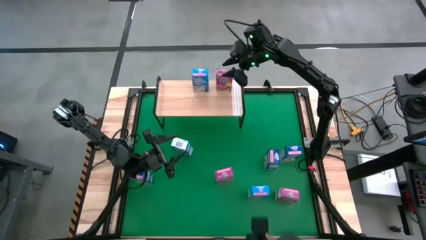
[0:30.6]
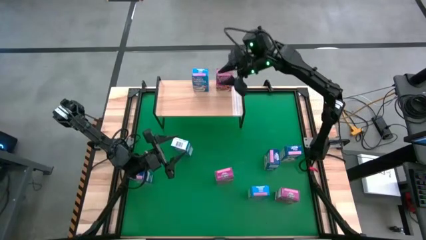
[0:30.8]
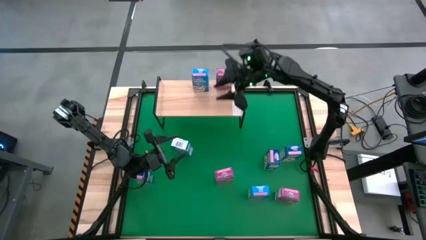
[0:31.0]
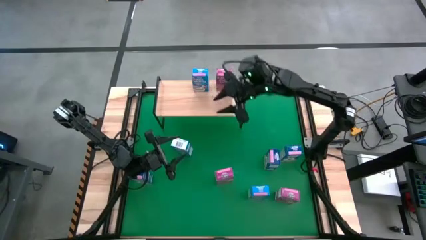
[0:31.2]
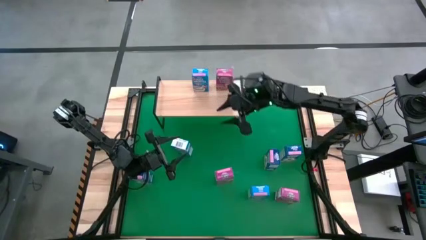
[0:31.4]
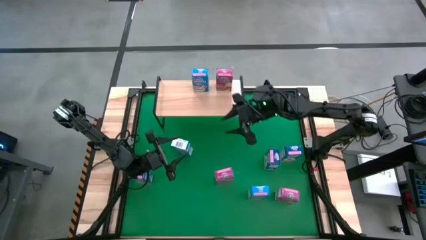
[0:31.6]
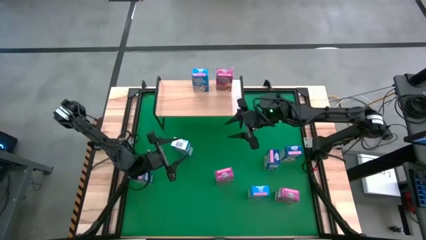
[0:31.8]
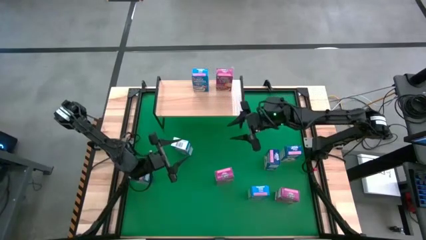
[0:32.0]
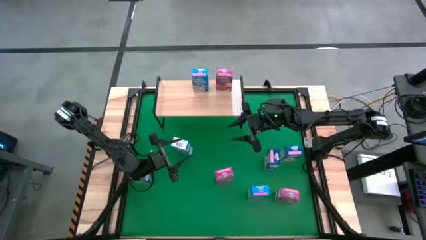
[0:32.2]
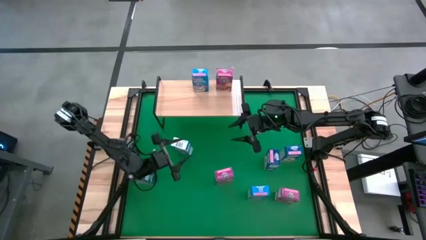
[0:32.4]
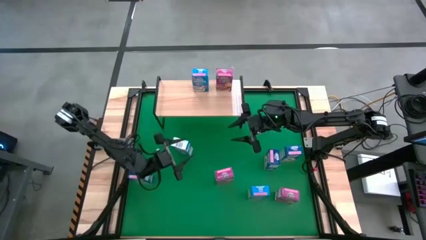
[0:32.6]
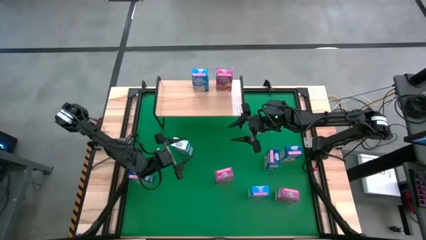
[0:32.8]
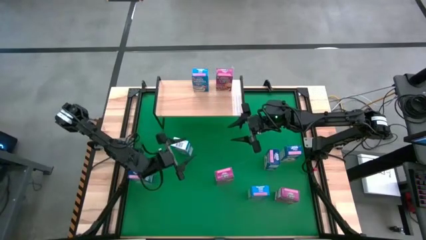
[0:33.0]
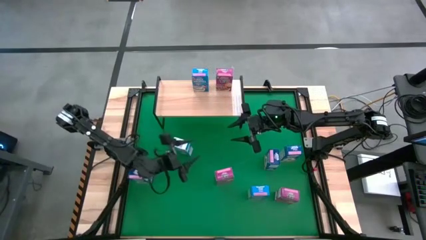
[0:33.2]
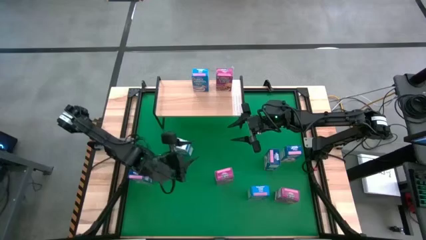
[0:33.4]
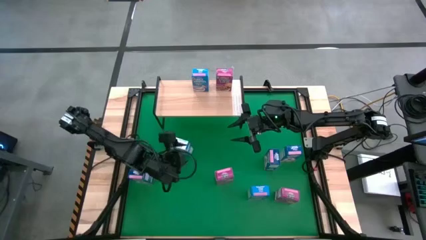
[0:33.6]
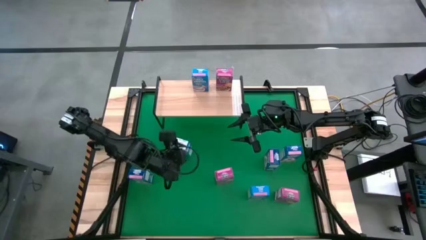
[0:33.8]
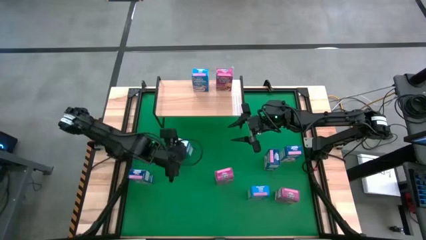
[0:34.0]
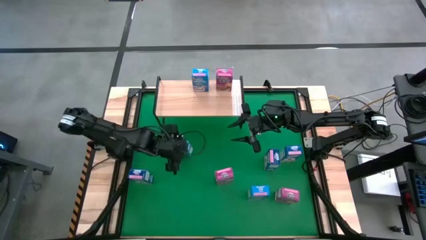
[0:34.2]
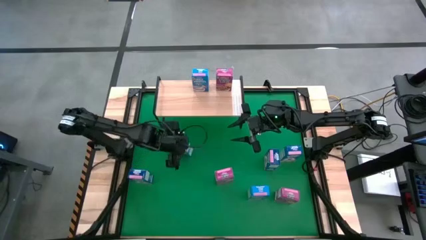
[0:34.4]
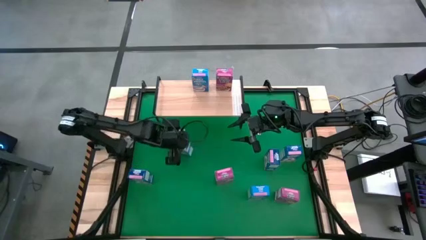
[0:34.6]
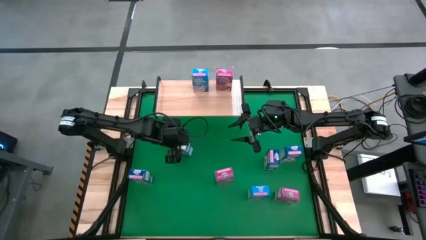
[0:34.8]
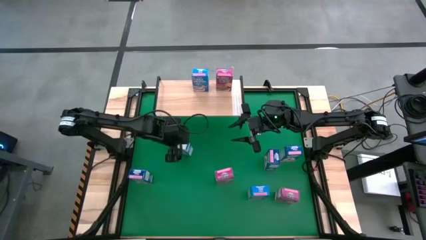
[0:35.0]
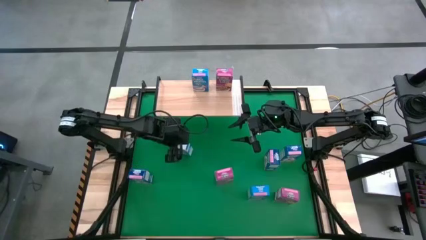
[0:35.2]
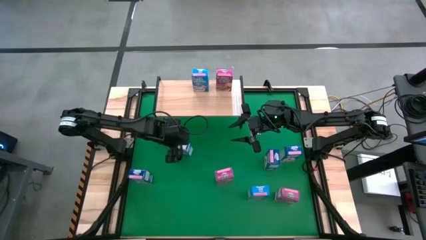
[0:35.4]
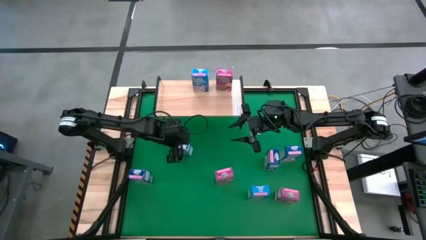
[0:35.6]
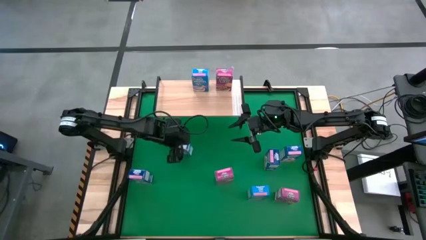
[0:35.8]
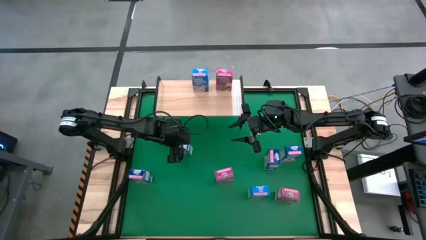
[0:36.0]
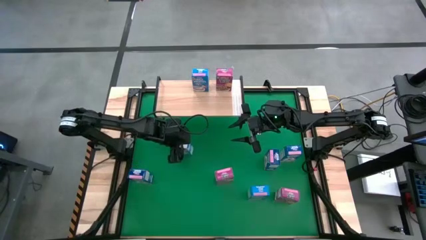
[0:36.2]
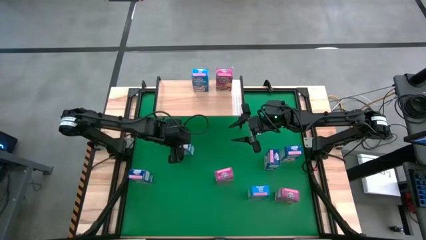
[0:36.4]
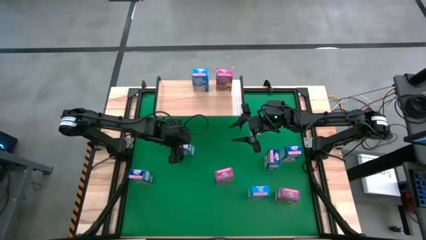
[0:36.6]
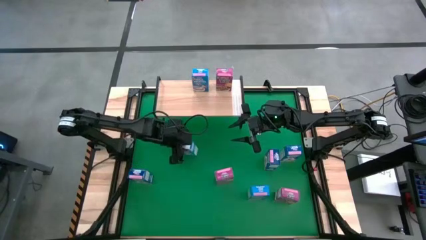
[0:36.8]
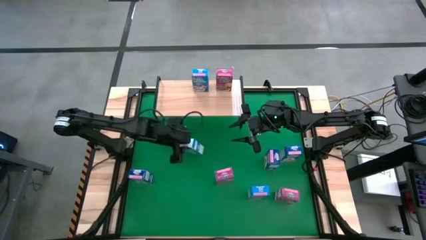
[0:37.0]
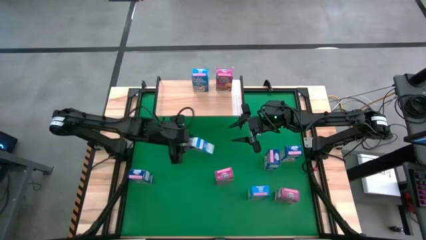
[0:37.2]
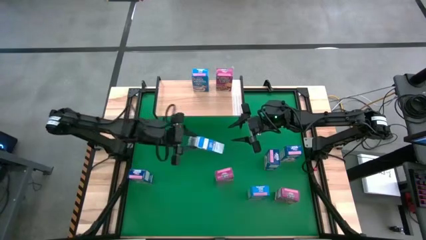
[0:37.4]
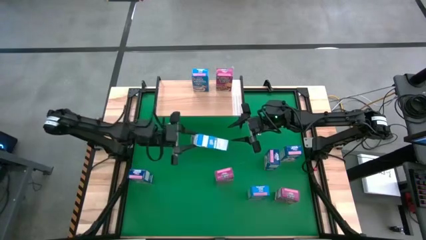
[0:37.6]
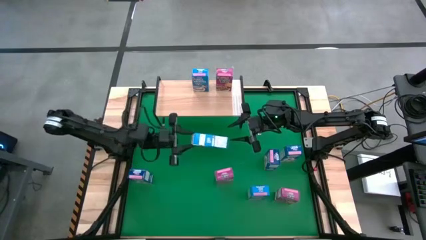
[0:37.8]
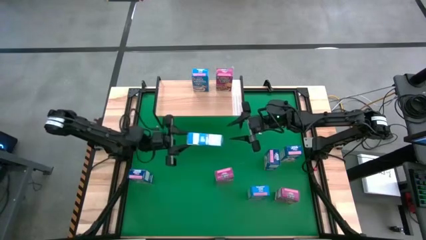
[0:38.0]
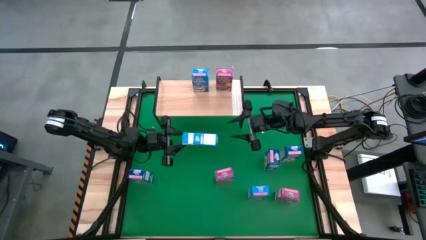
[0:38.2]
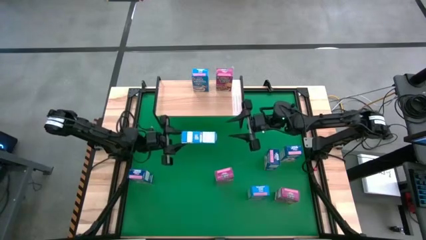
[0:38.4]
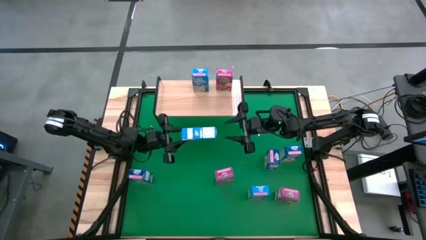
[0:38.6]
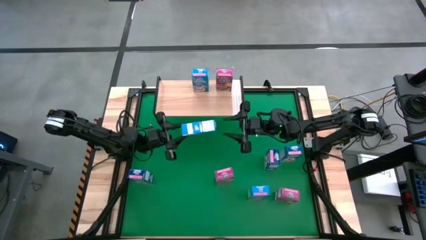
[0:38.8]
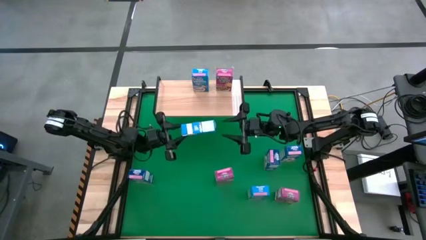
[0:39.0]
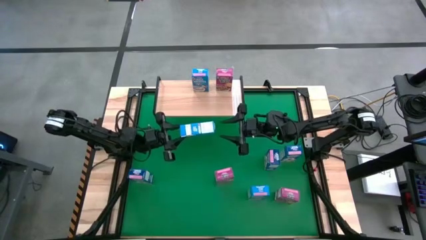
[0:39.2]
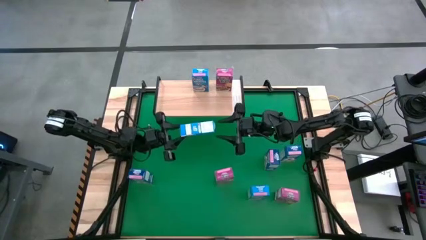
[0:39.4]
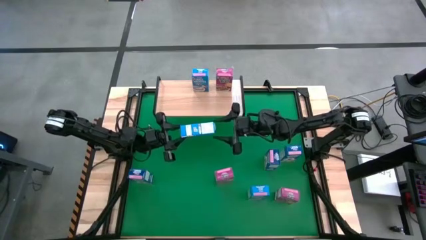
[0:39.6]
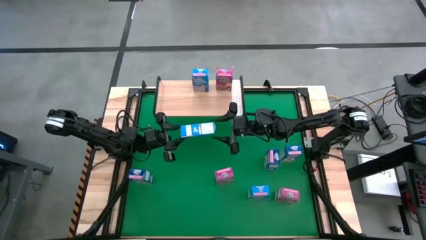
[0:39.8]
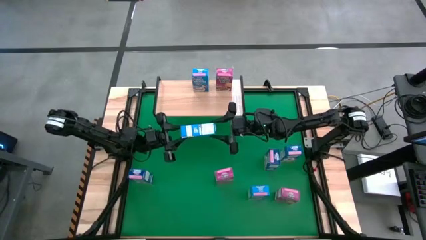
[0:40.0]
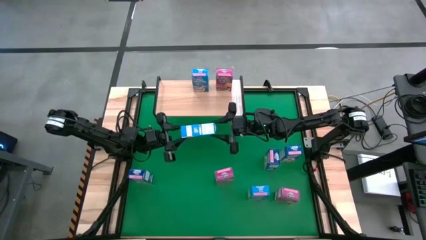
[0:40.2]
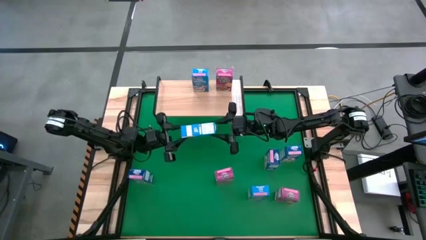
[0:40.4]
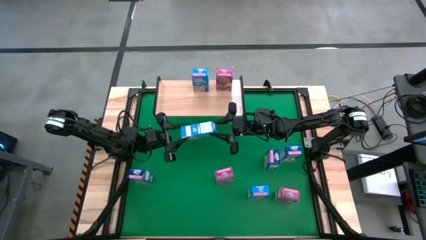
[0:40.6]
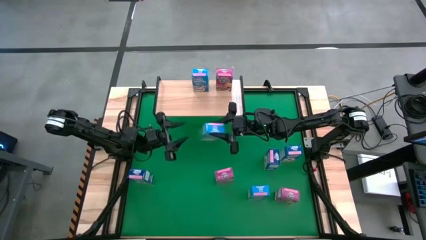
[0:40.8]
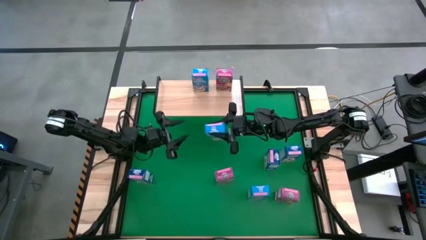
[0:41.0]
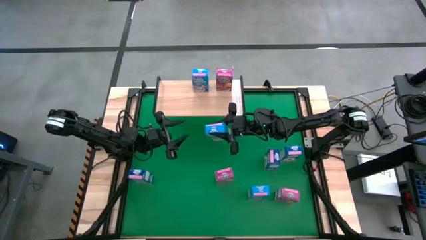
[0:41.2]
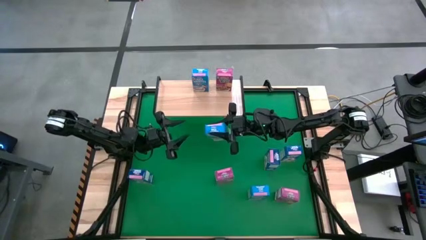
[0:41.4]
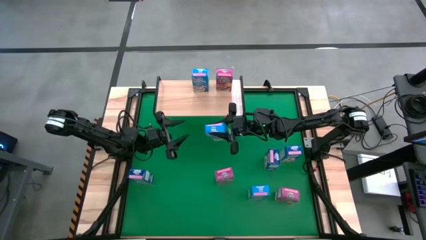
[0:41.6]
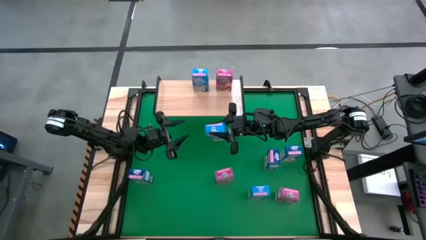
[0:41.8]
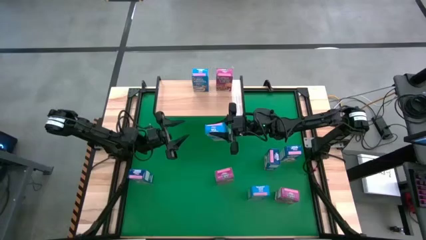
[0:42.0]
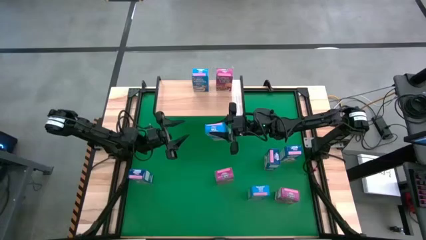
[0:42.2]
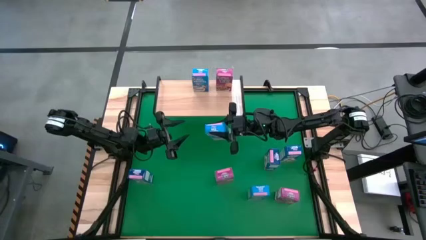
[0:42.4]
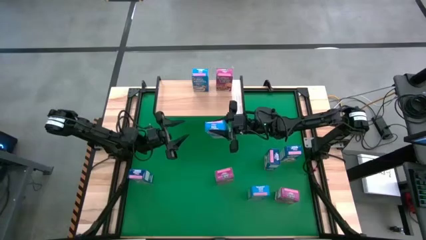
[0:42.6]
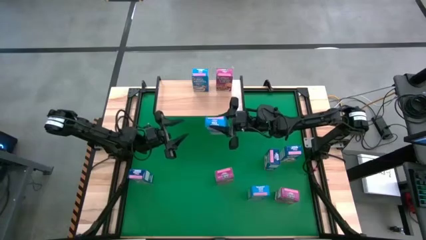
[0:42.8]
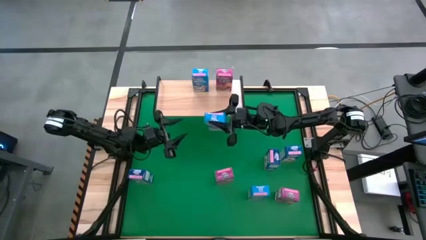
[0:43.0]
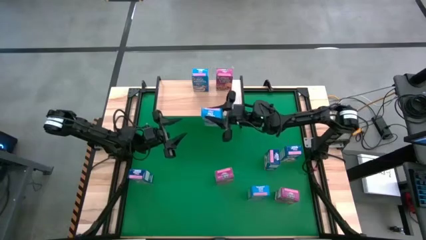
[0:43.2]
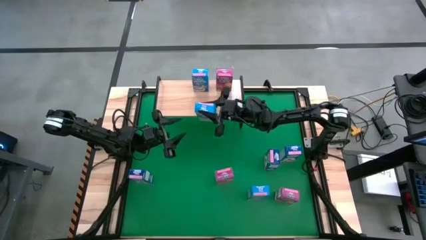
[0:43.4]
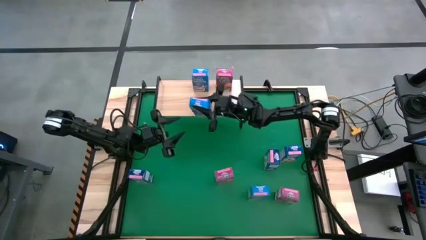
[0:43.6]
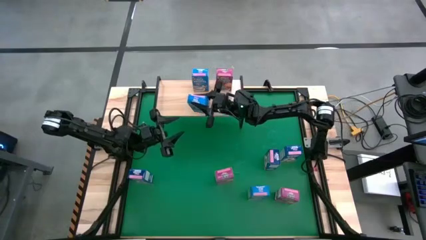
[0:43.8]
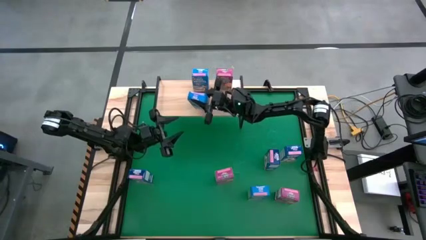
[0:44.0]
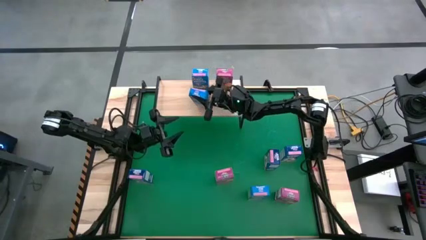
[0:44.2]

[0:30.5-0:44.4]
Task: Stack cereal on shelf
Put the top light blue cereal box on the shelf aligned with the other light blue box
